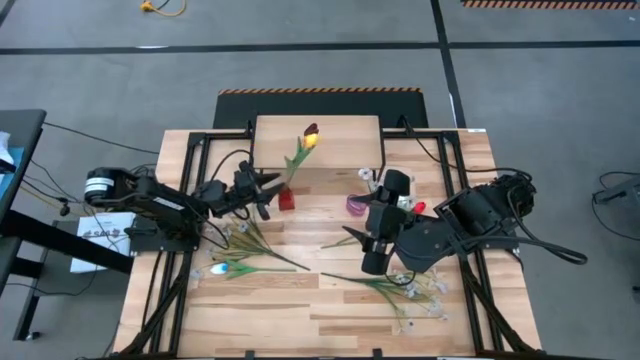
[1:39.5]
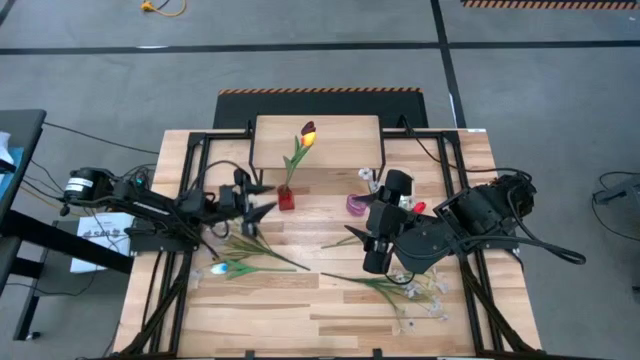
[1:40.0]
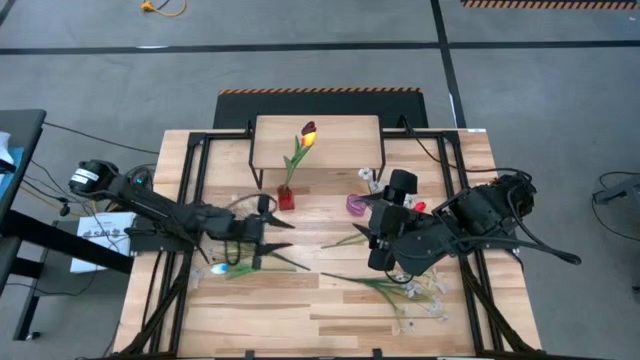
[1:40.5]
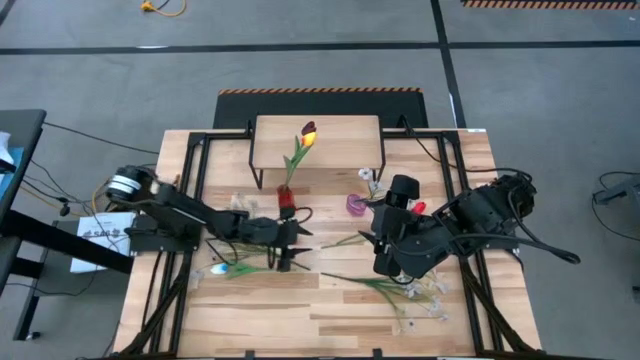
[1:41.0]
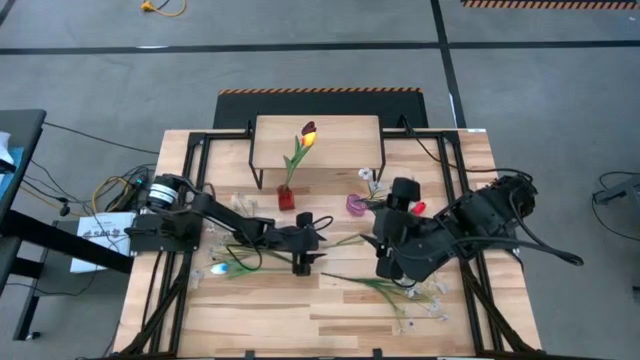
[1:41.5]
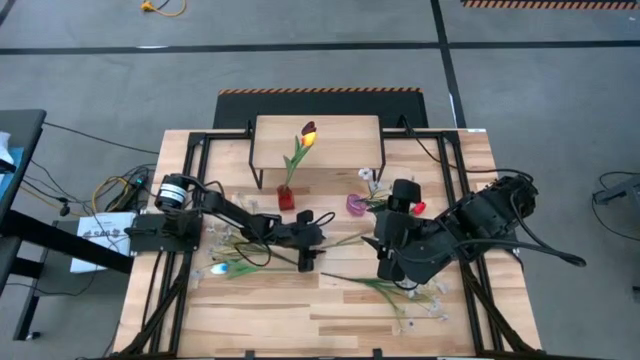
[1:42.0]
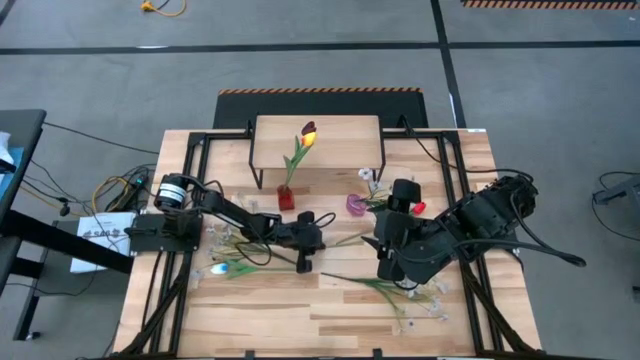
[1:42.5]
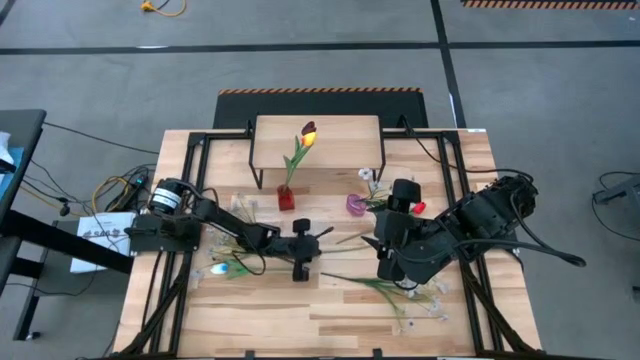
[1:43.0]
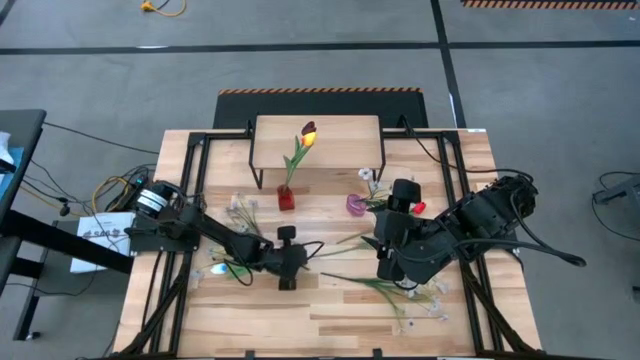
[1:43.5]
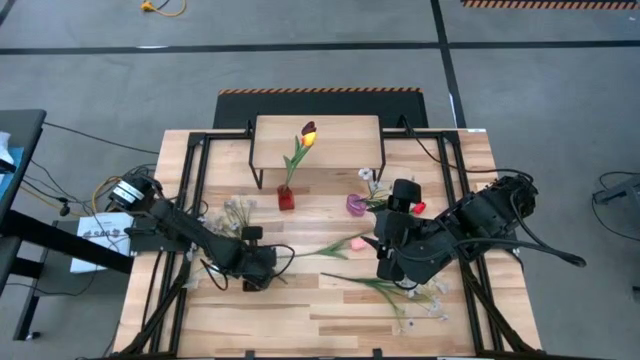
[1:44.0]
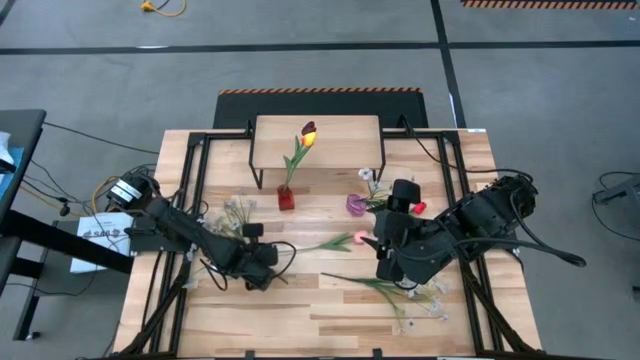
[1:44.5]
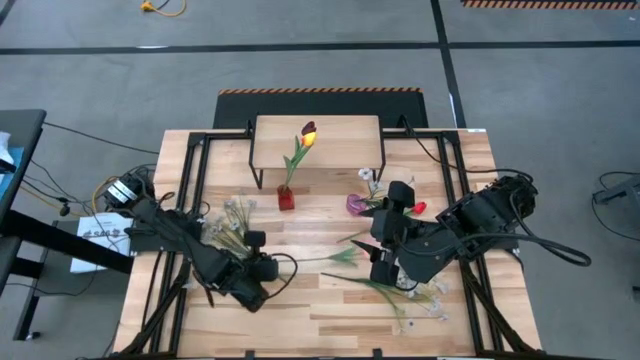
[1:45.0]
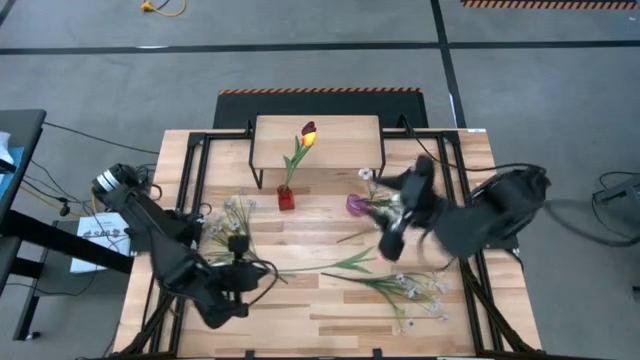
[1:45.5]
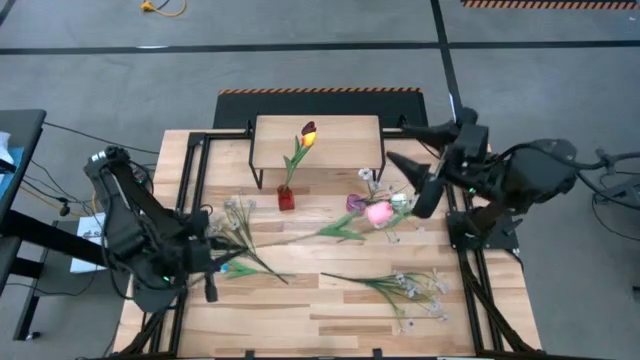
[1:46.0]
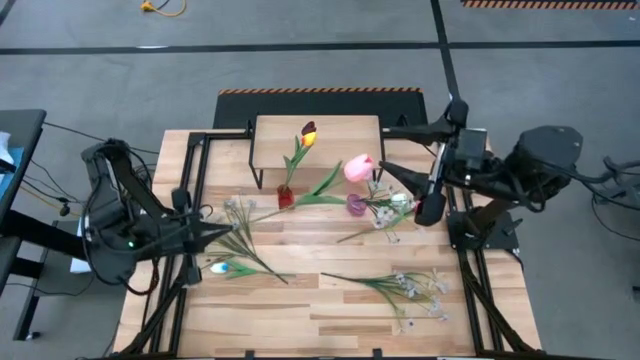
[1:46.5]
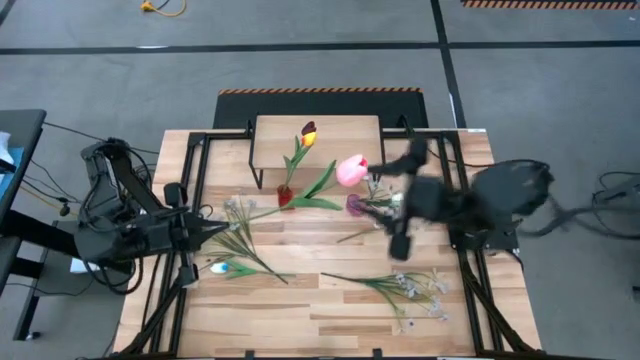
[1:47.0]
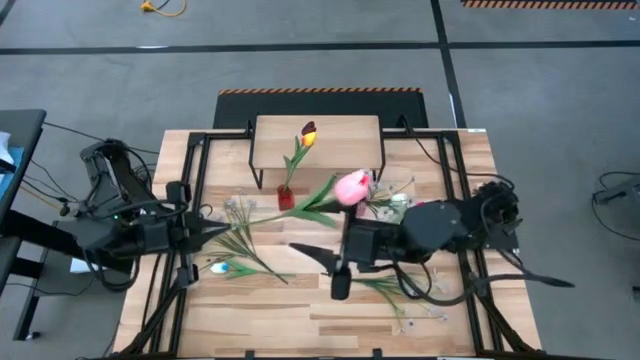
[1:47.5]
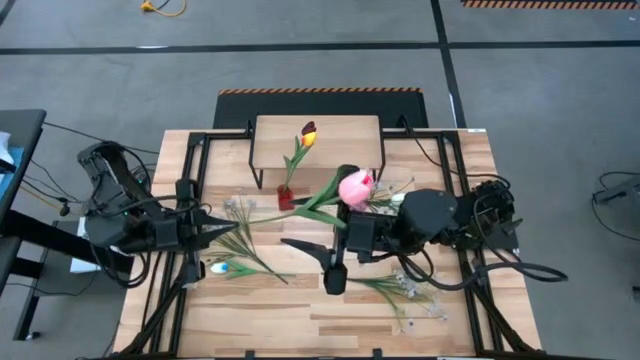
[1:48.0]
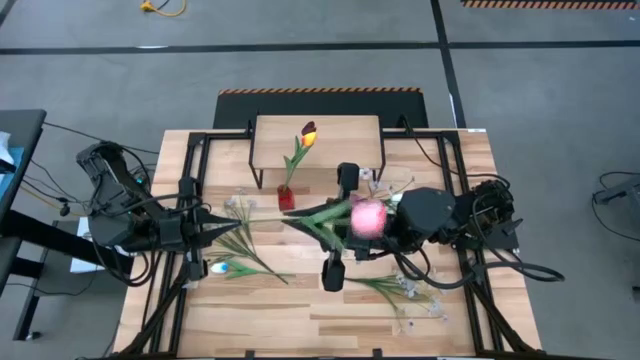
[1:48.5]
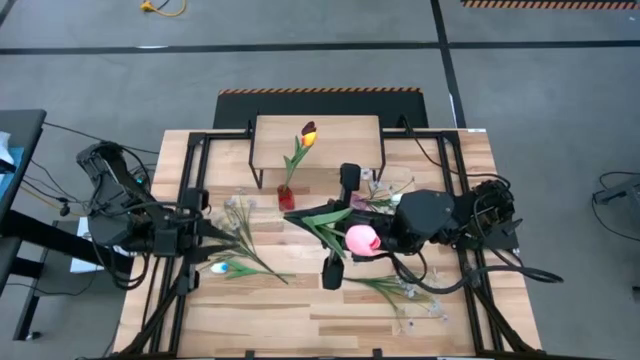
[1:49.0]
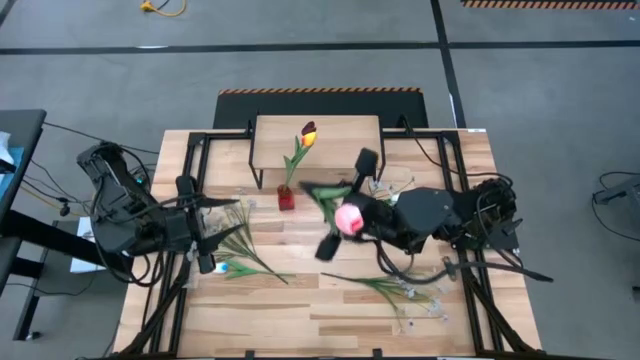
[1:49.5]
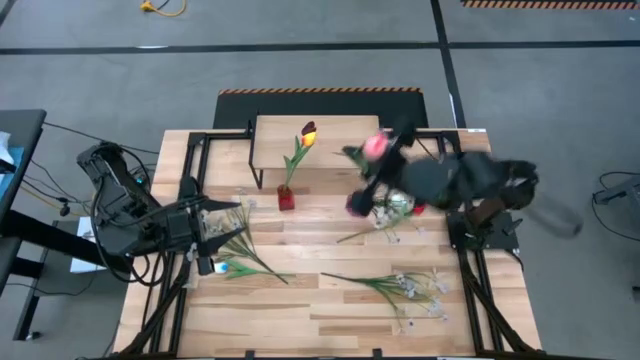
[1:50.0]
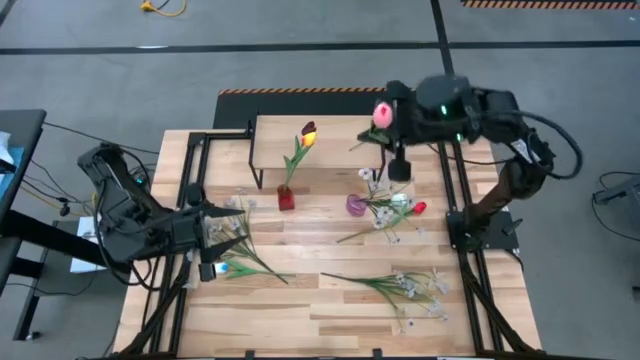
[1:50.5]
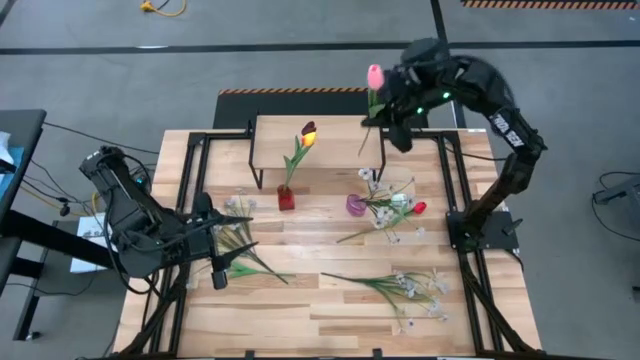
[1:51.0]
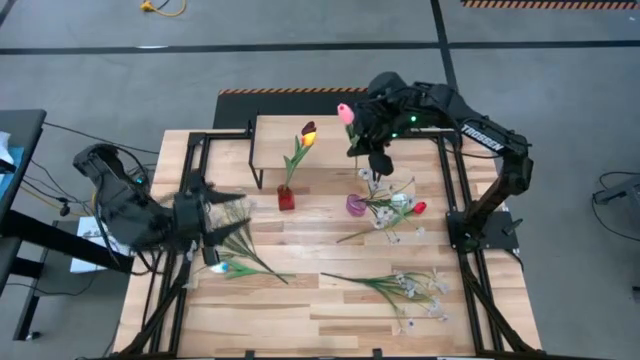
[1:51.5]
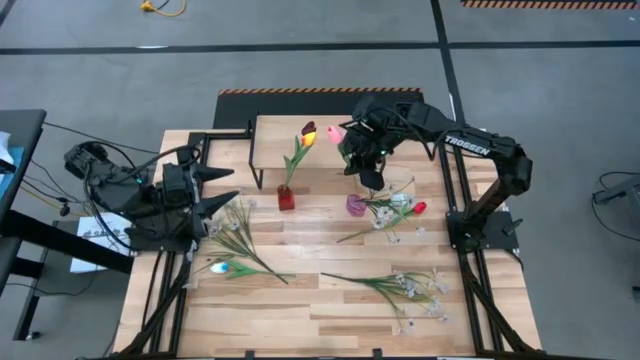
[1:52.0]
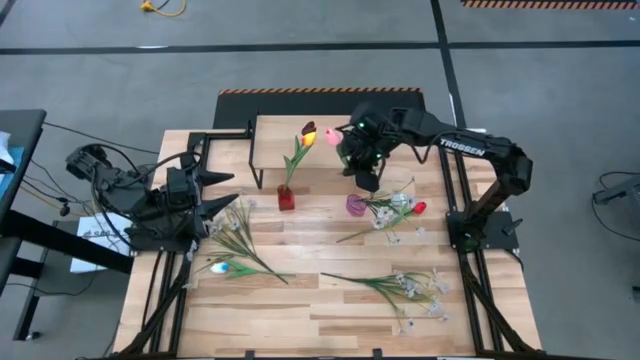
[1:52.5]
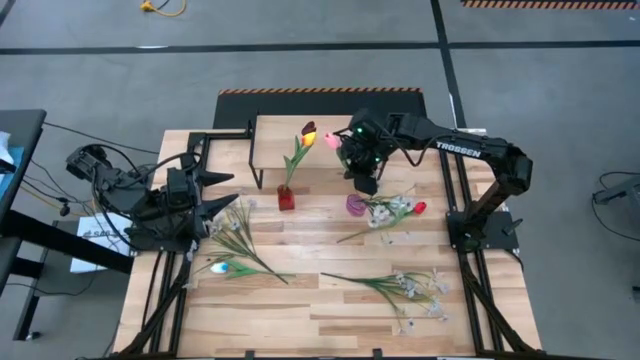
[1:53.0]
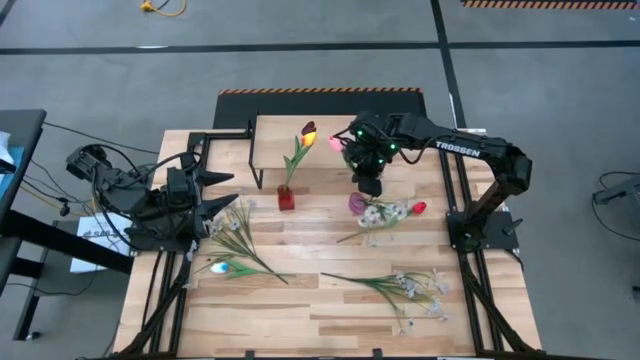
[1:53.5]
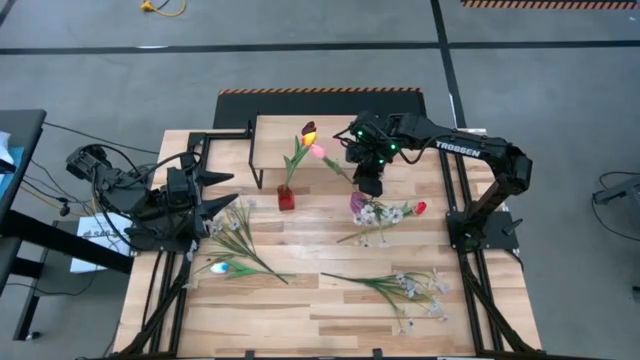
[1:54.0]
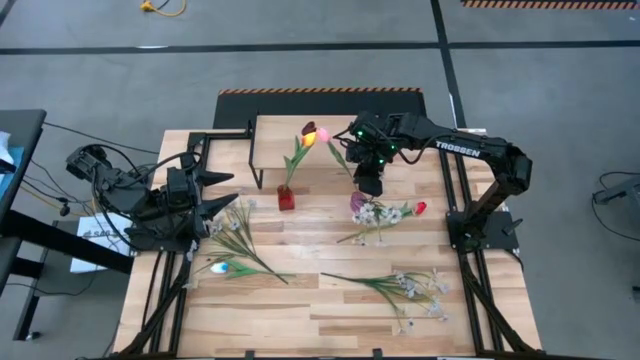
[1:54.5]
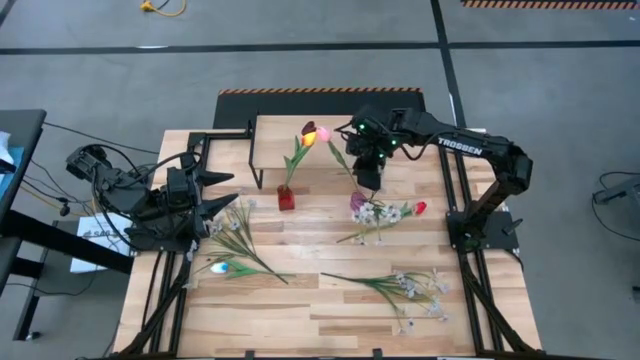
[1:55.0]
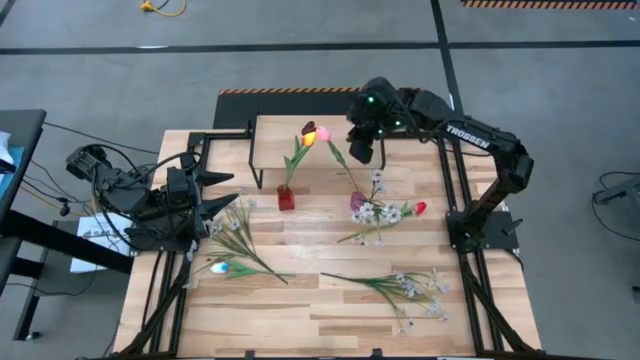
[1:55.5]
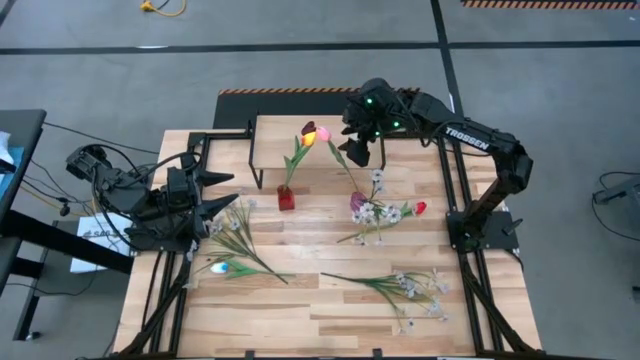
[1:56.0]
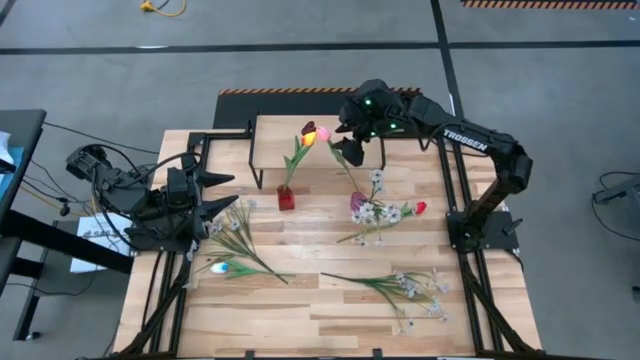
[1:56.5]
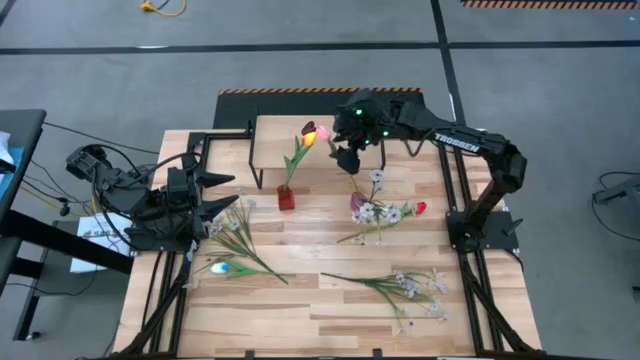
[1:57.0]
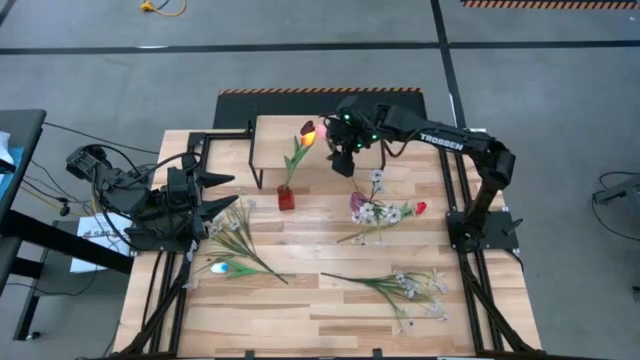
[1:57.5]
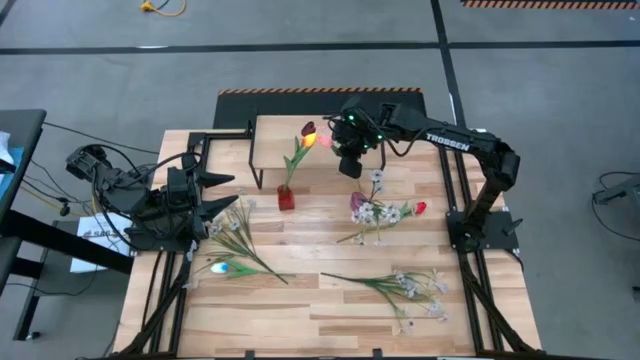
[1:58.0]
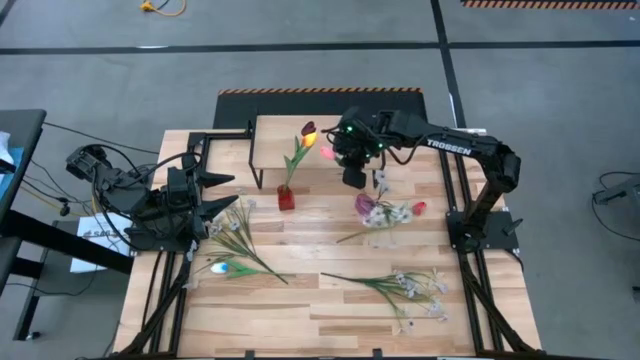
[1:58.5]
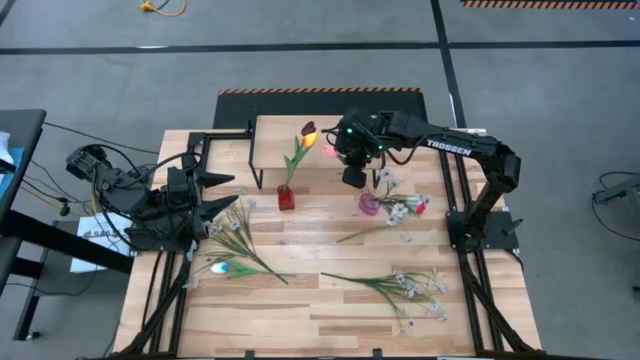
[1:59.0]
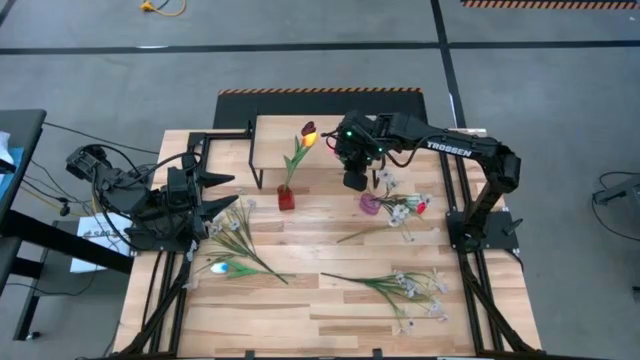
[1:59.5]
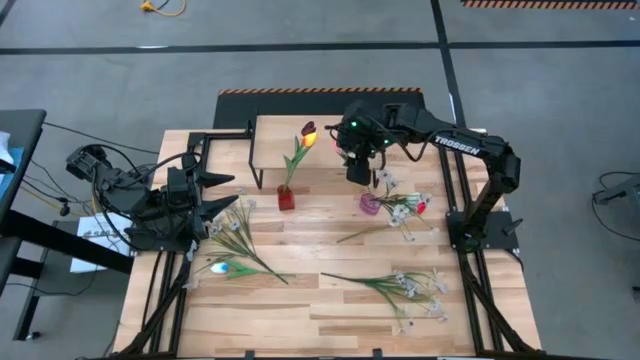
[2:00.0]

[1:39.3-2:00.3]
Task: Pick and place flowers into a vace then onto a shelf
Put the pink tulip into the pink vase

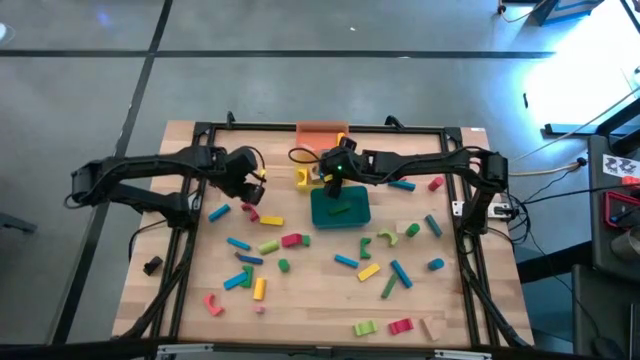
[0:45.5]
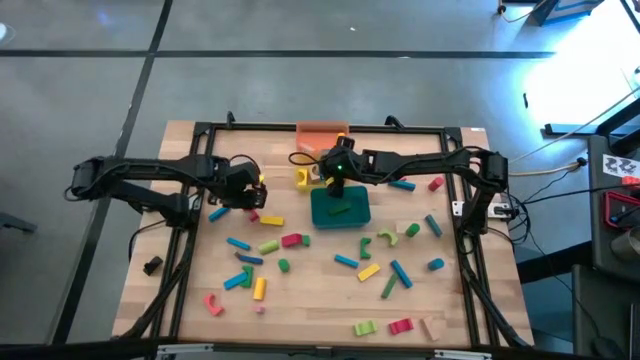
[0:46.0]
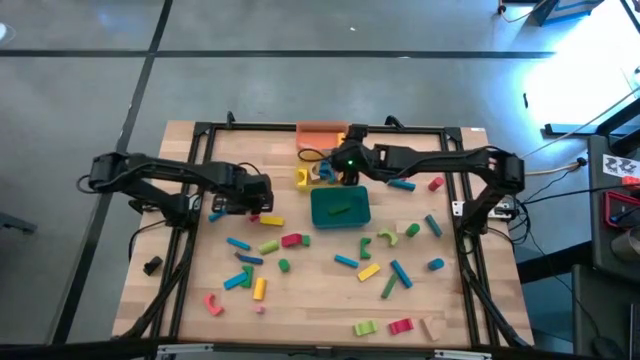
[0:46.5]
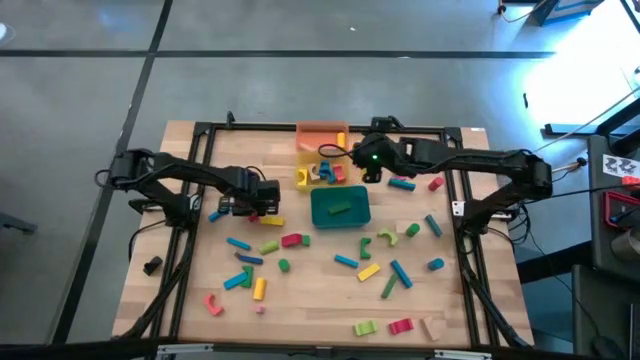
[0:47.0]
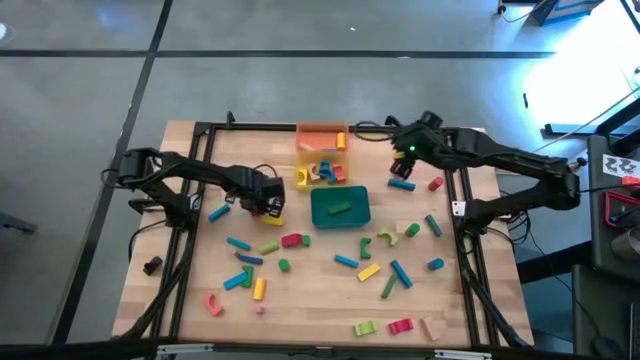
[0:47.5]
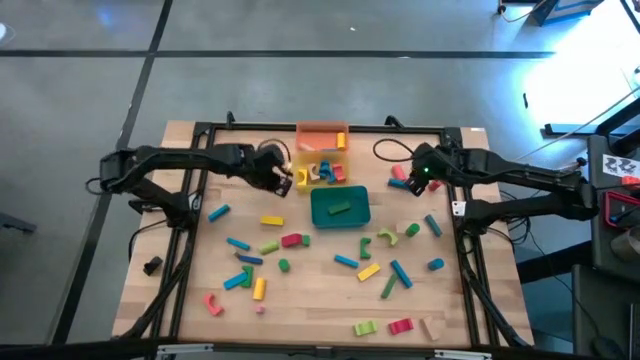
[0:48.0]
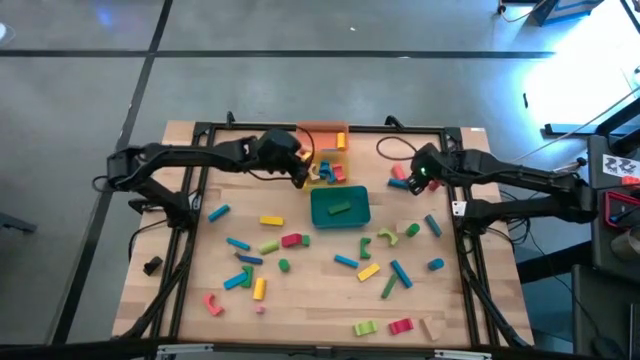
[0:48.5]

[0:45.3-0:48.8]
Task: Sort blocks by size
Put the red arch block into the yellow bin
